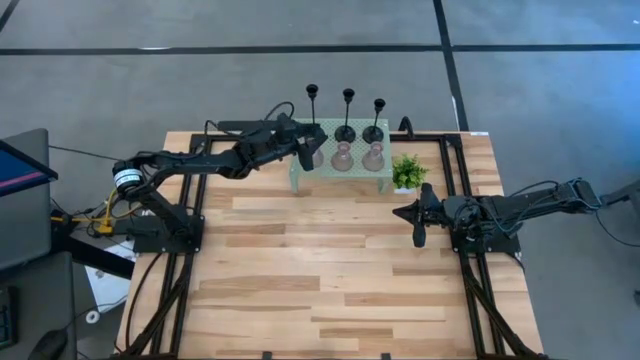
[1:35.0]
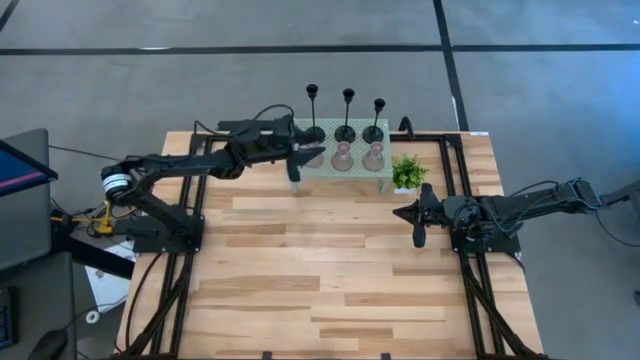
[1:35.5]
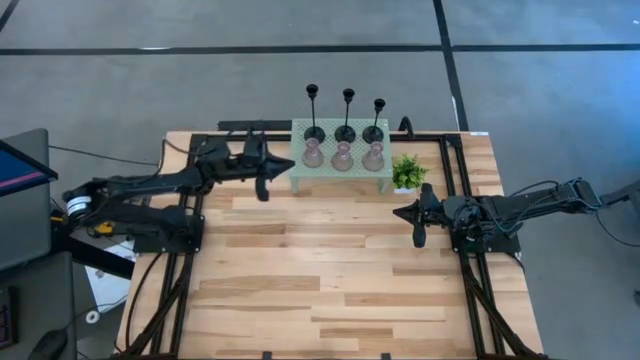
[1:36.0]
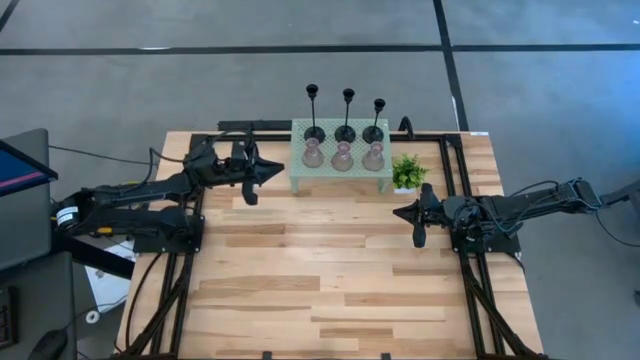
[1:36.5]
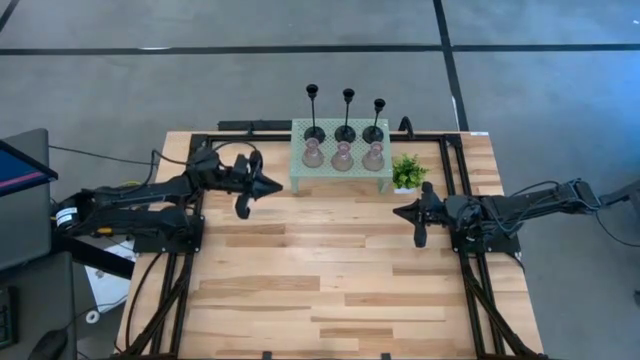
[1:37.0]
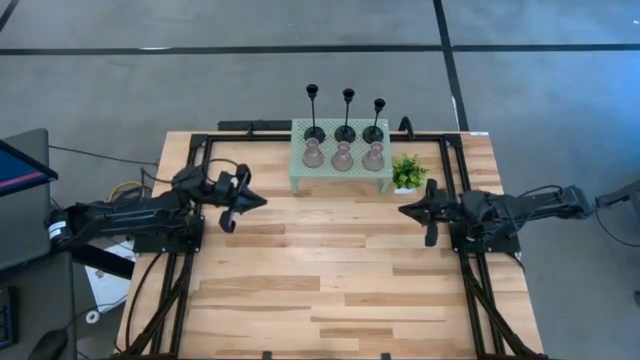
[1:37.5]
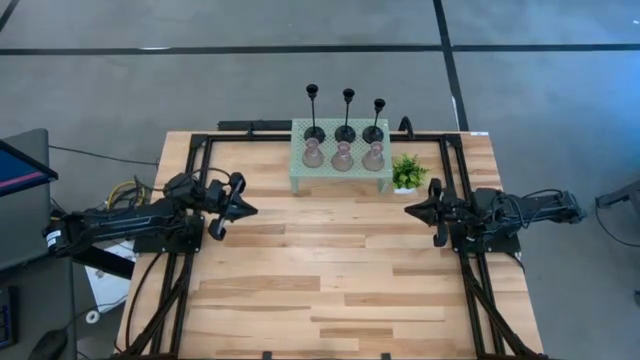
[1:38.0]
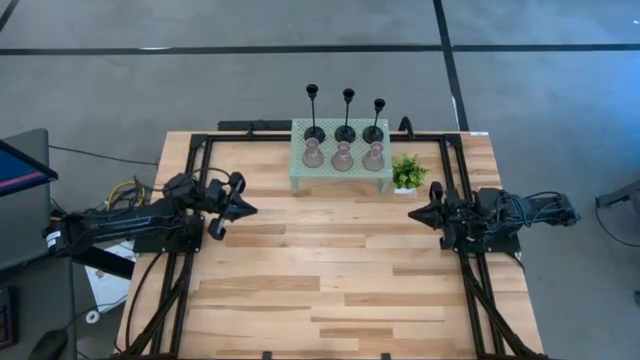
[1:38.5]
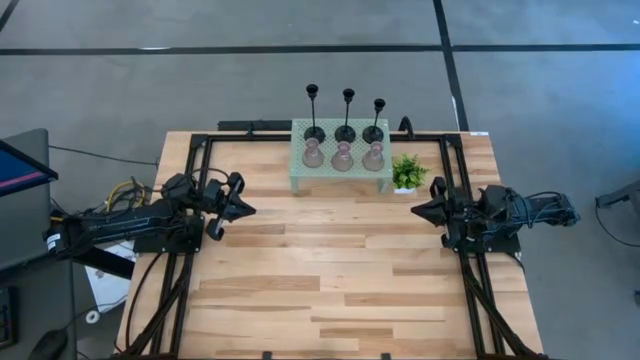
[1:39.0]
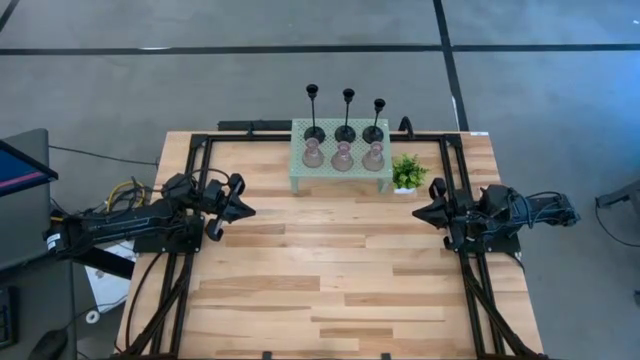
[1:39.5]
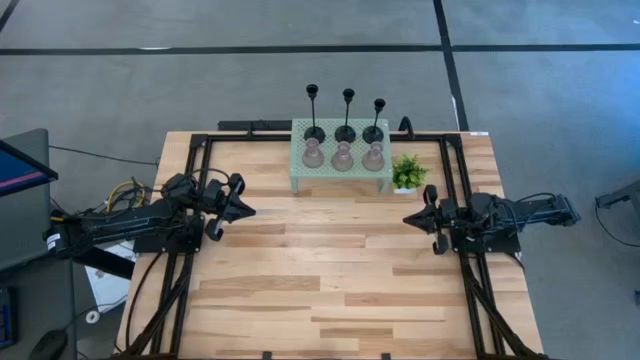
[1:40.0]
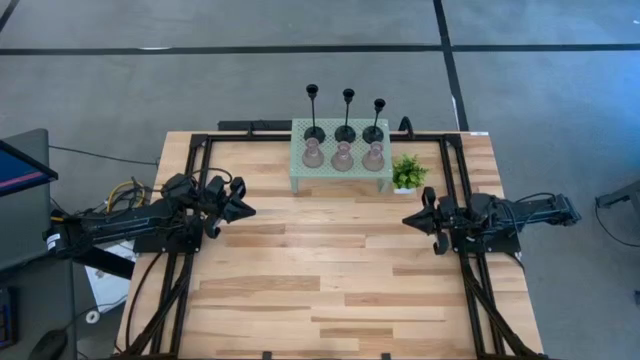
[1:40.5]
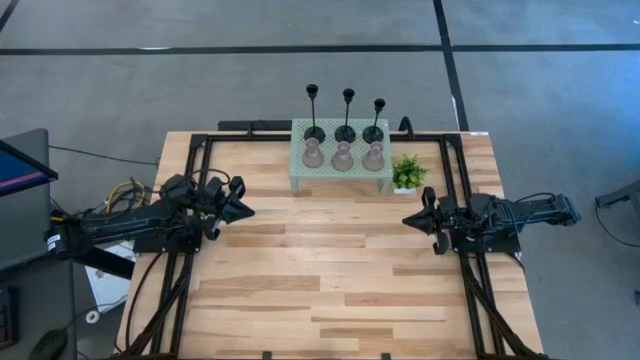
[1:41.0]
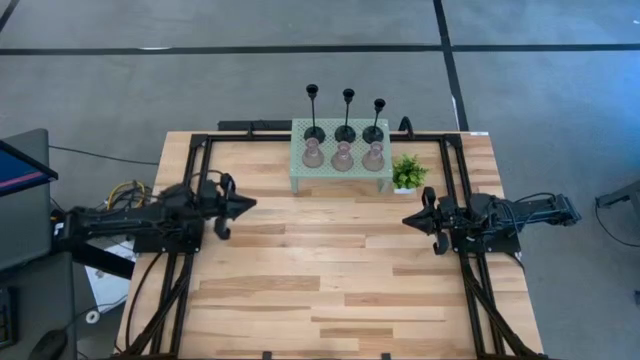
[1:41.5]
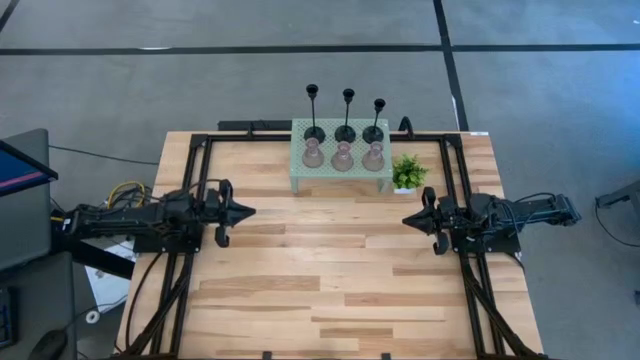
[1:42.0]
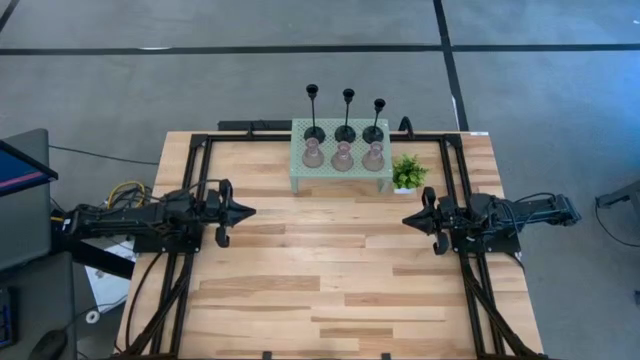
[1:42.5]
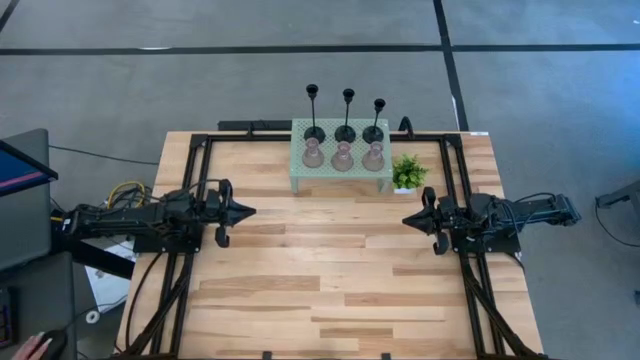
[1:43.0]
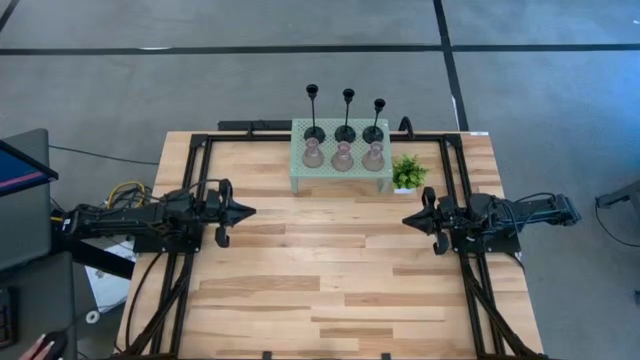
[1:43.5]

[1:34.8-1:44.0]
Task: Pick & Place candle stick holders
Return to Home Position

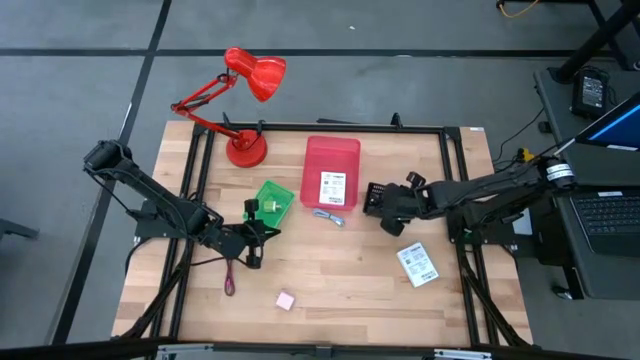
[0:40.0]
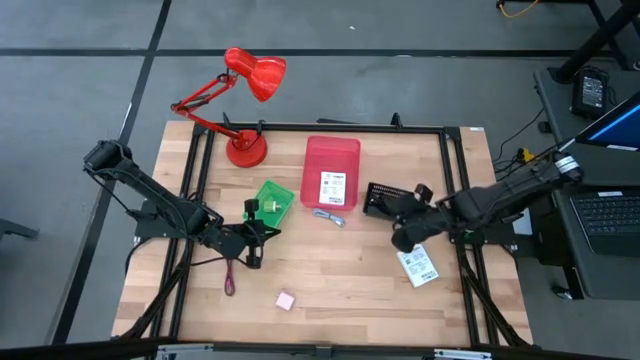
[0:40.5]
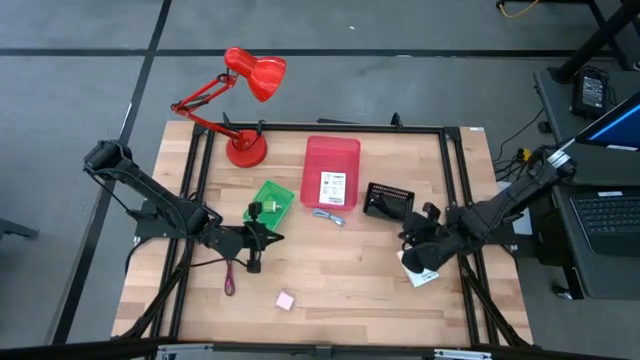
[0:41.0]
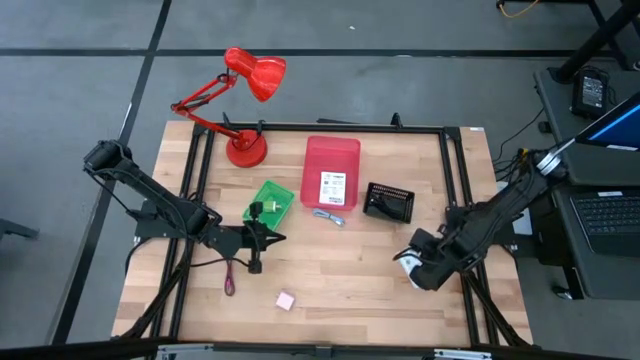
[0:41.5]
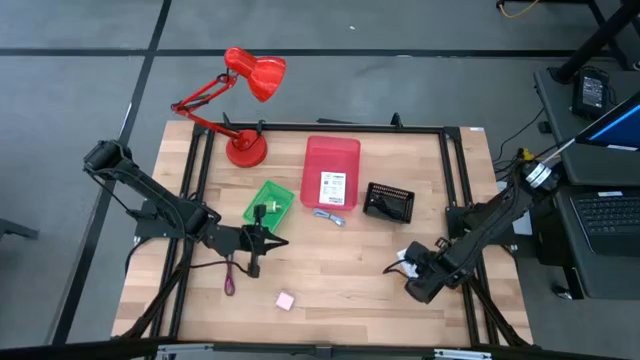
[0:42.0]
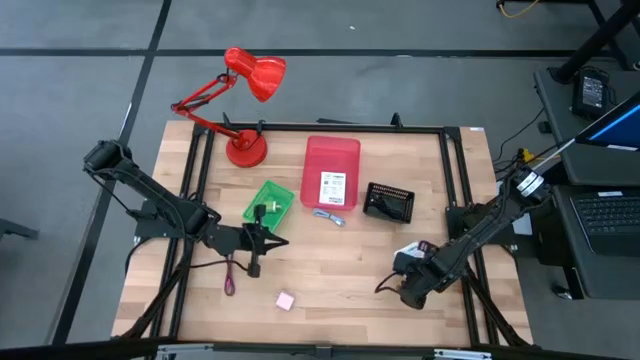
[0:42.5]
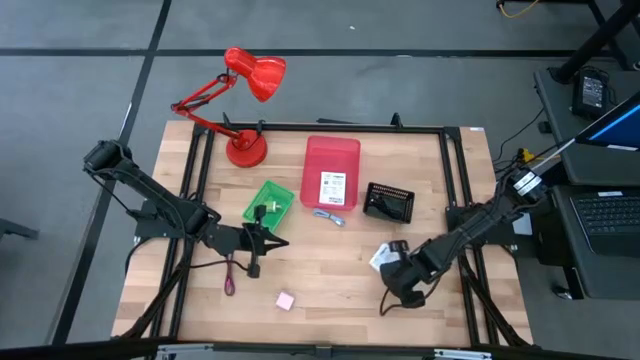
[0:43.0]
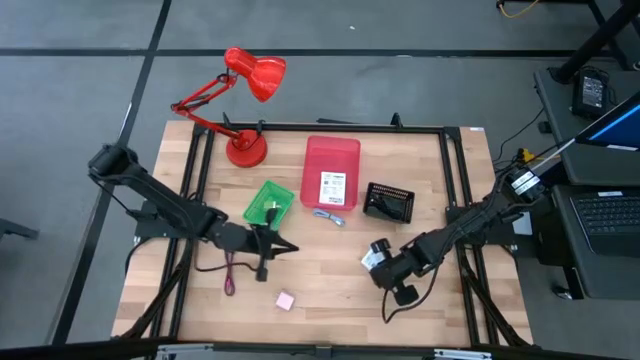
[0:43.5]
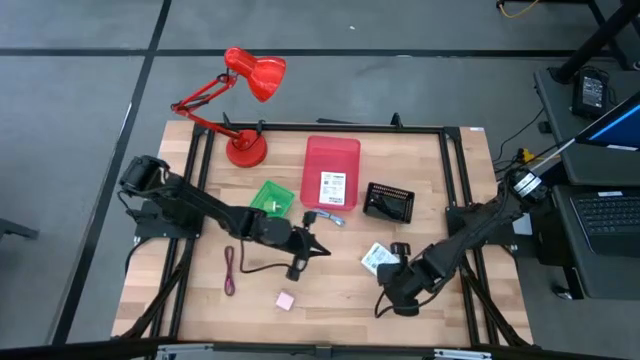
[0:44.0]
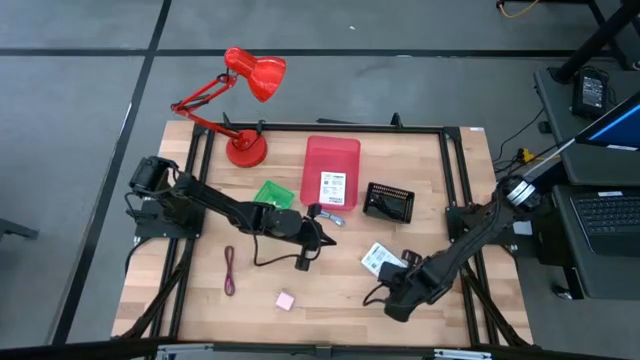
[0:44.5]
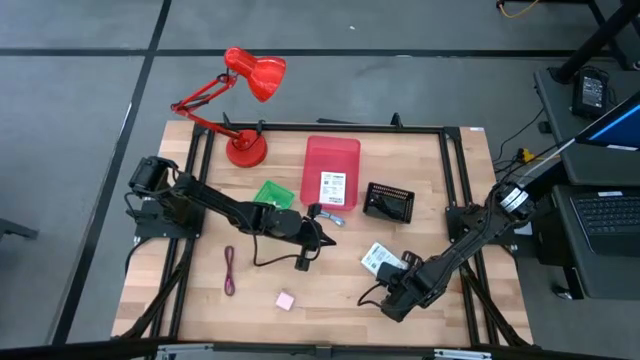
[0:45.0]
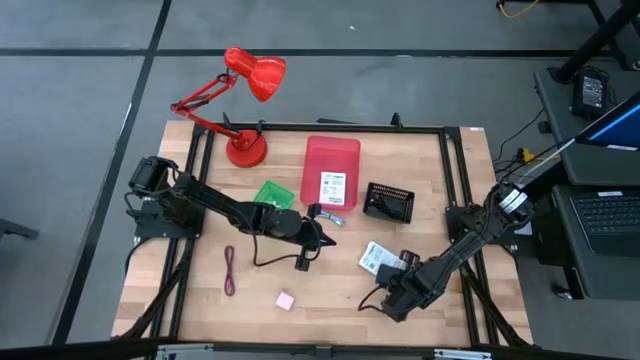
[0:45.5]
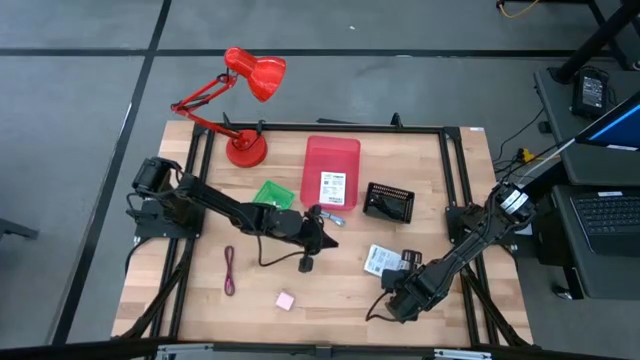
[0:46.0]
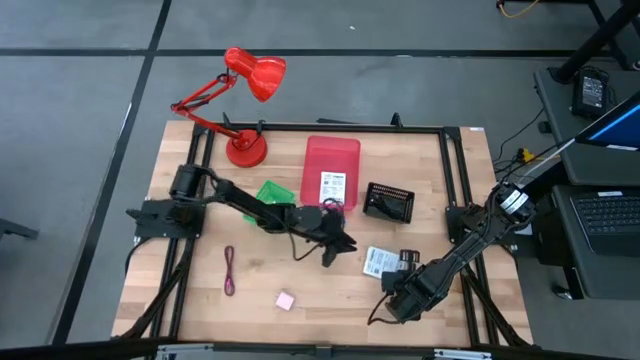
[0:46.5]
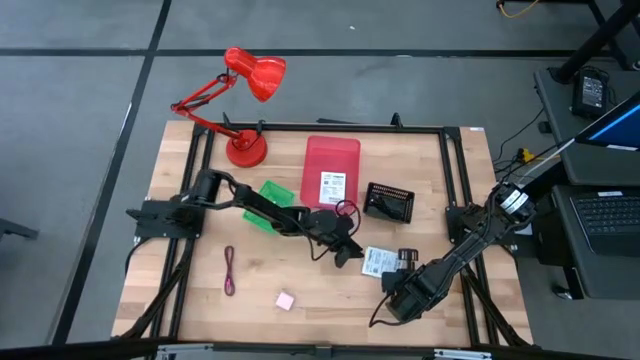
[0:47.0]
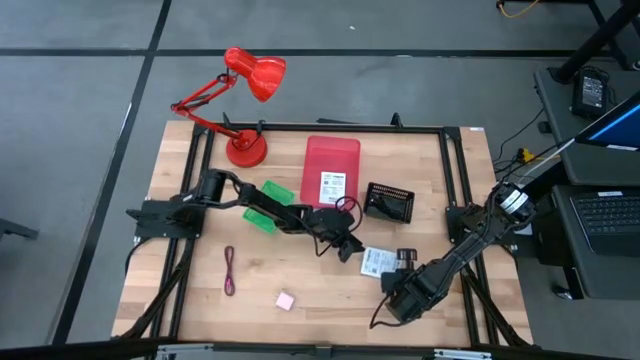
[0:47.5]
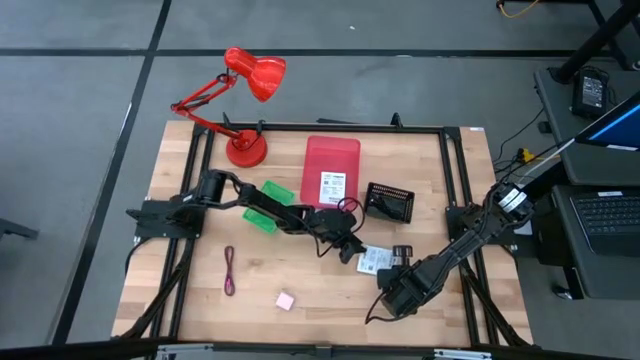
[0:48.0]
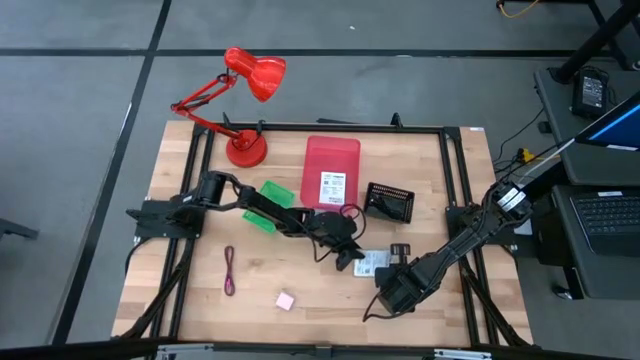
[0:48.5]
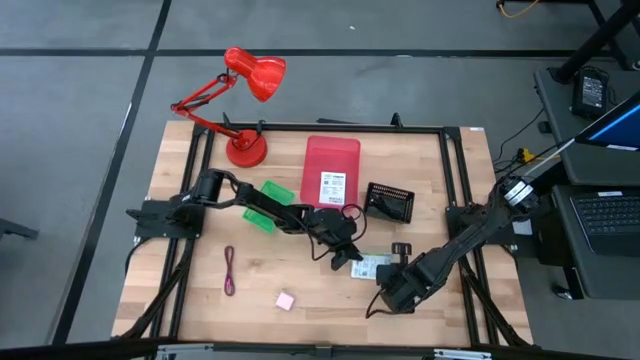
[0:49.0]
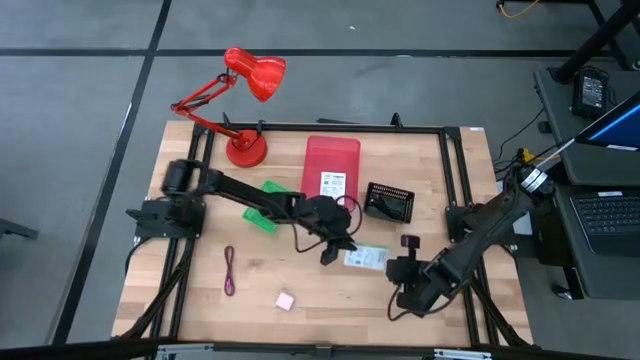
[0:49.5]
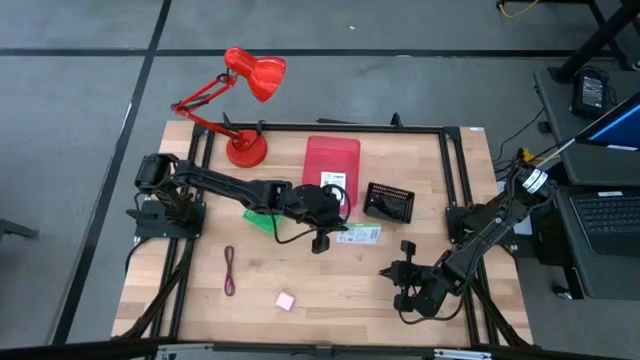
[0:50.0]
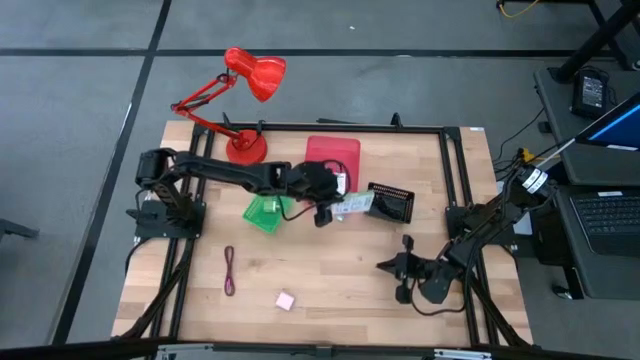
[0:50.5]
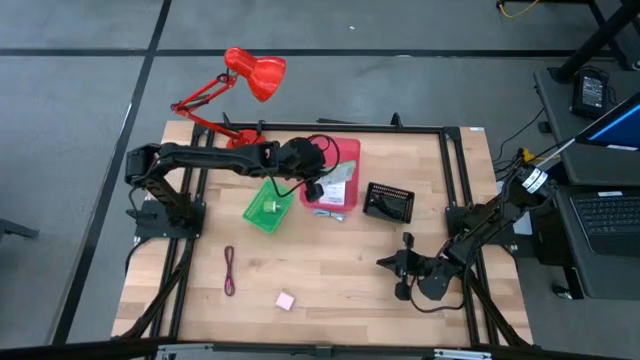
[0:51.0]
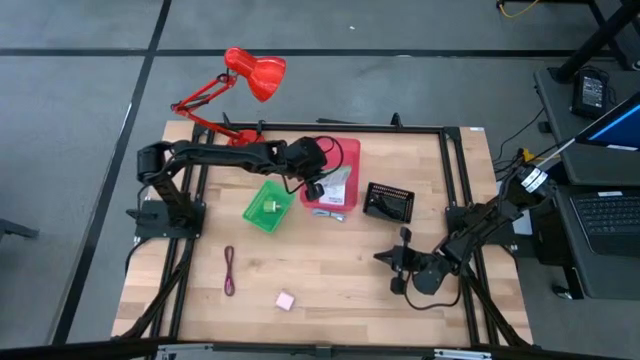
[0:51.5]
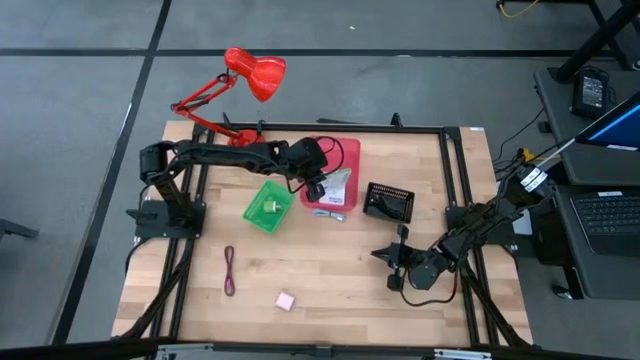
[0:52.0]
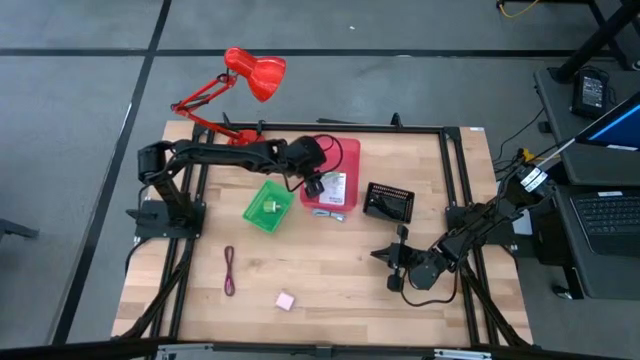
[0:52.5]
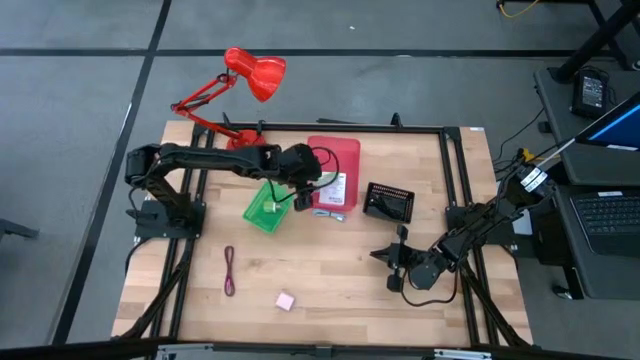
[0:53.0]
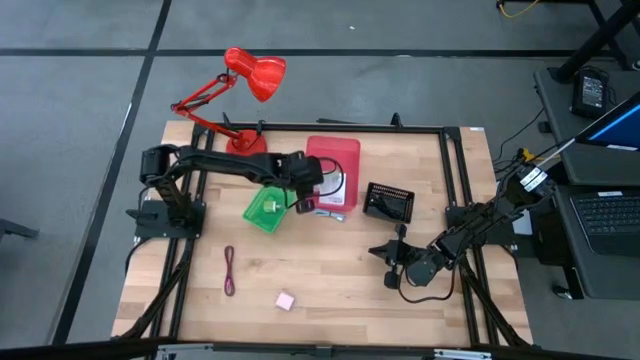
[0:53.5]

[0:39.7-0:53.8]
Task: Pick and place items into bin
Put the card reader box into the pink bin
